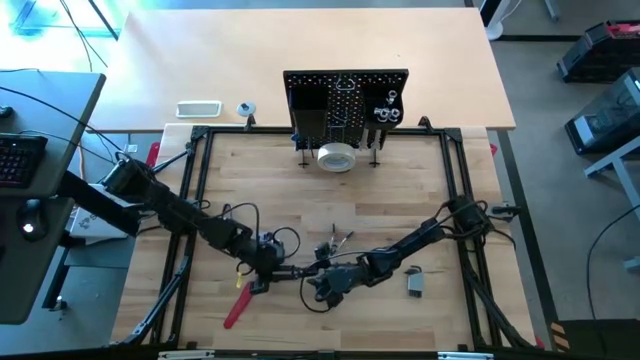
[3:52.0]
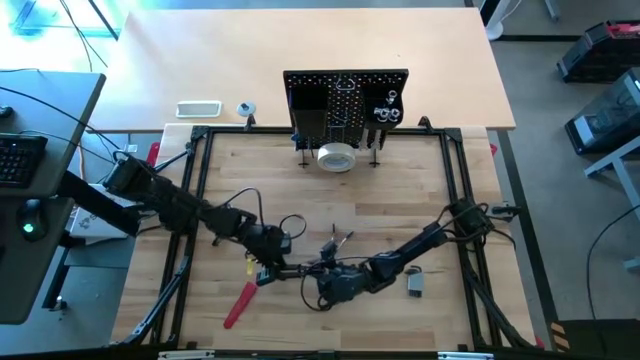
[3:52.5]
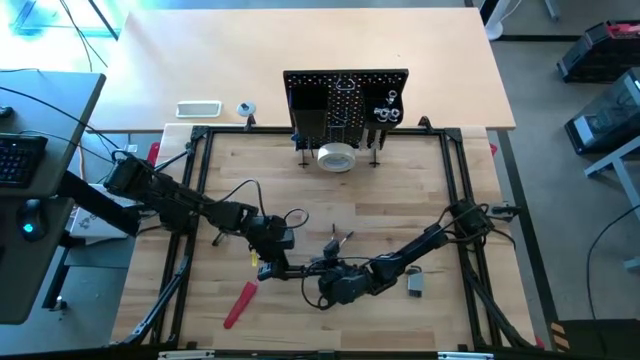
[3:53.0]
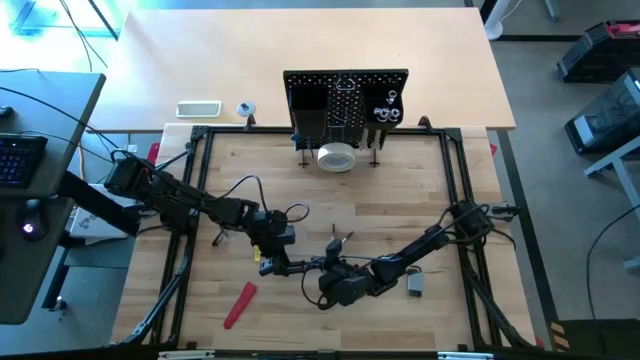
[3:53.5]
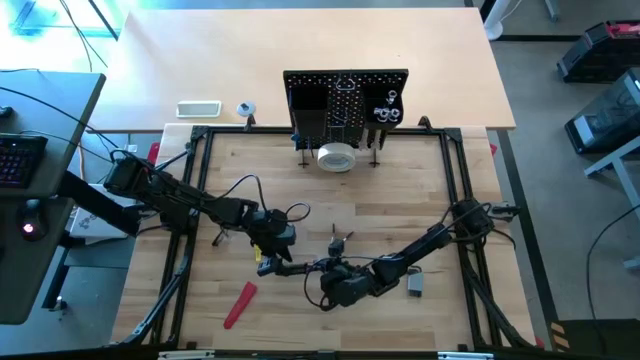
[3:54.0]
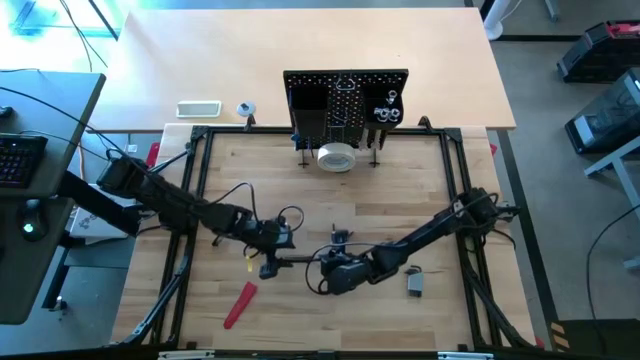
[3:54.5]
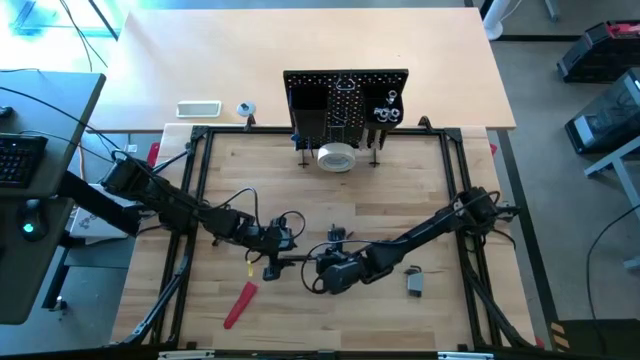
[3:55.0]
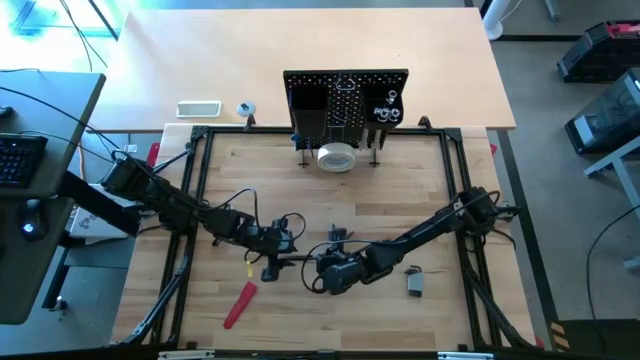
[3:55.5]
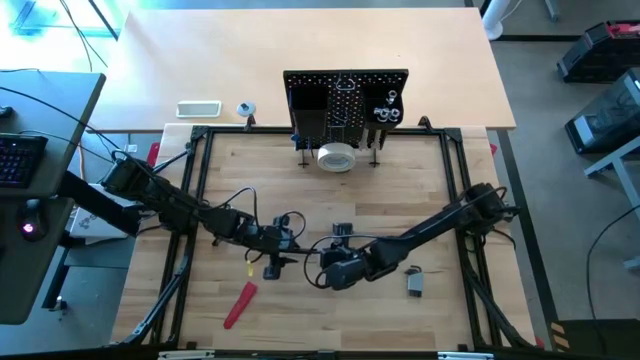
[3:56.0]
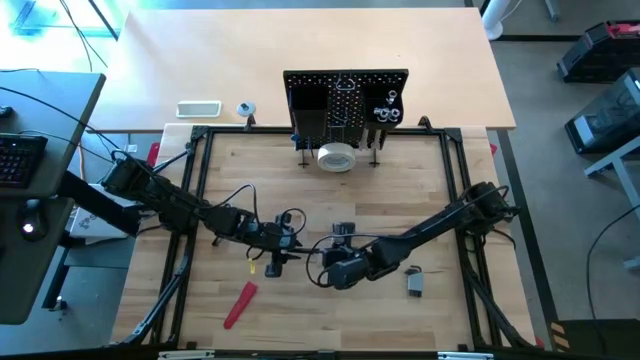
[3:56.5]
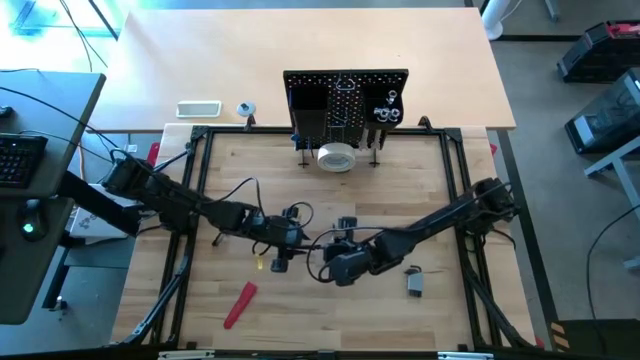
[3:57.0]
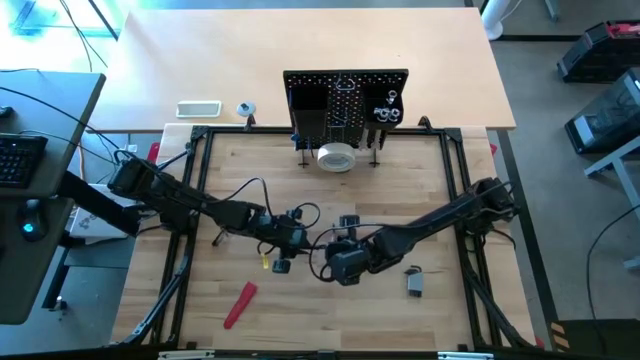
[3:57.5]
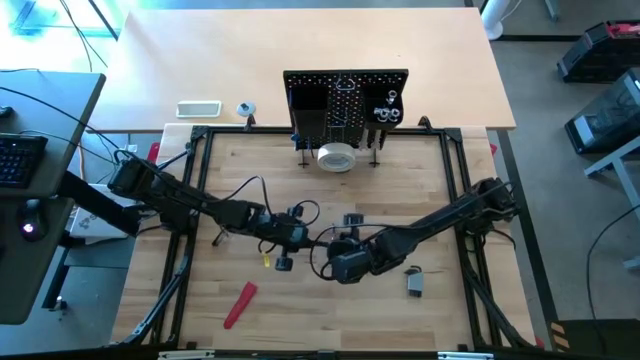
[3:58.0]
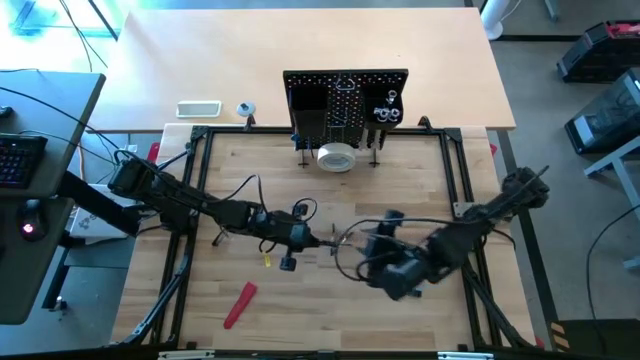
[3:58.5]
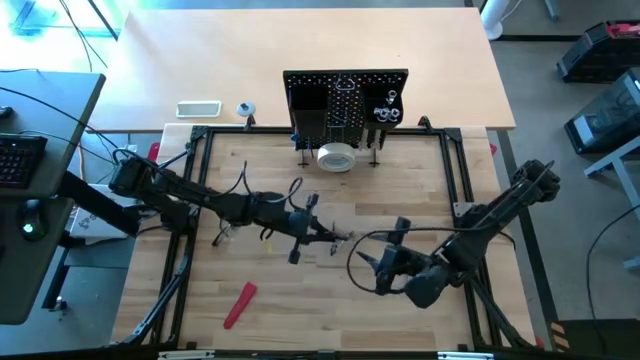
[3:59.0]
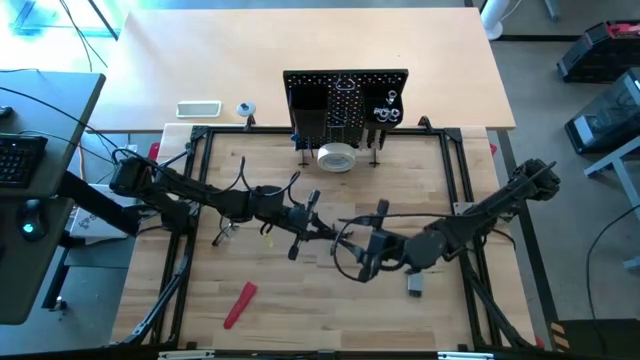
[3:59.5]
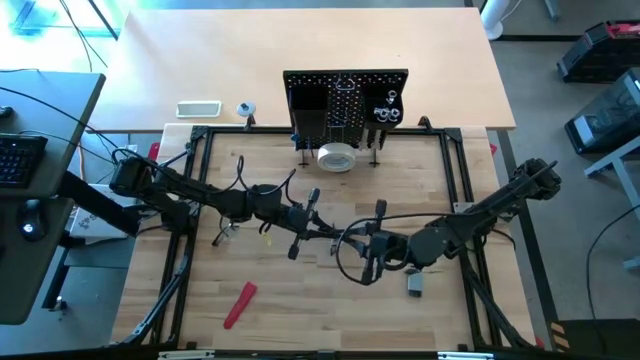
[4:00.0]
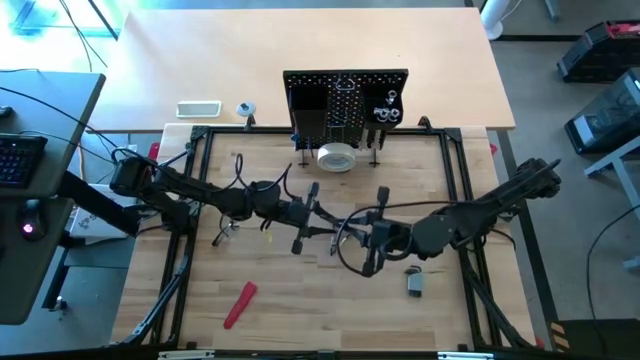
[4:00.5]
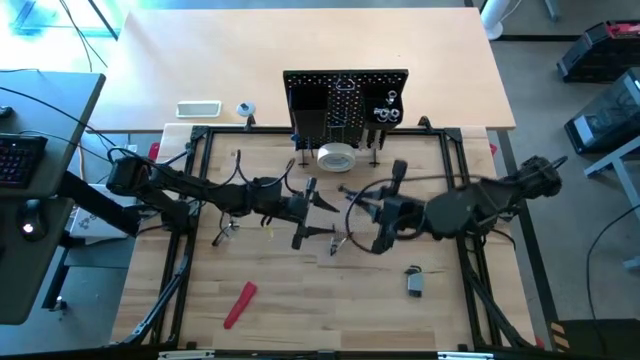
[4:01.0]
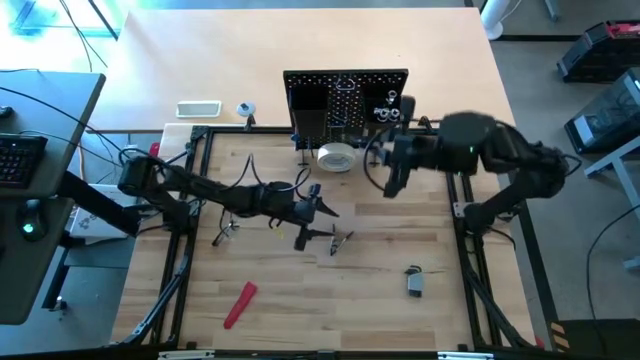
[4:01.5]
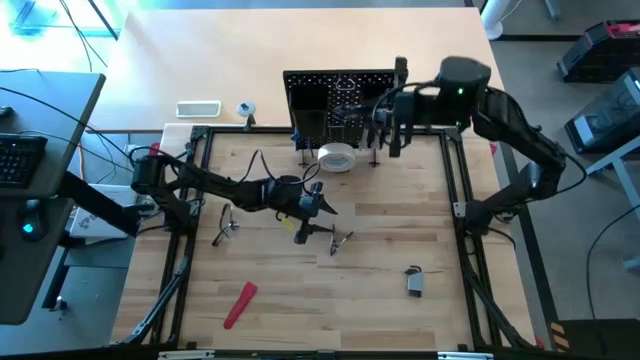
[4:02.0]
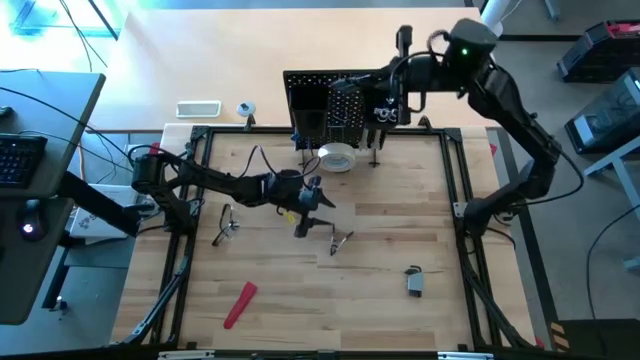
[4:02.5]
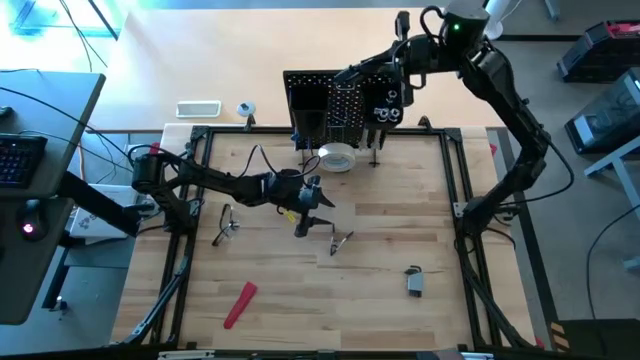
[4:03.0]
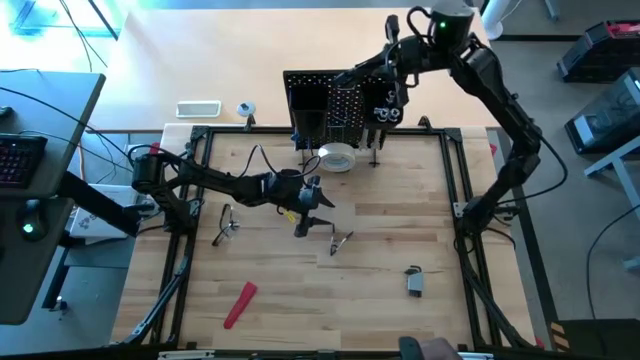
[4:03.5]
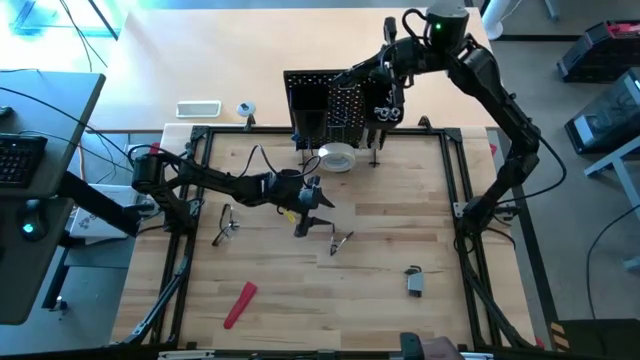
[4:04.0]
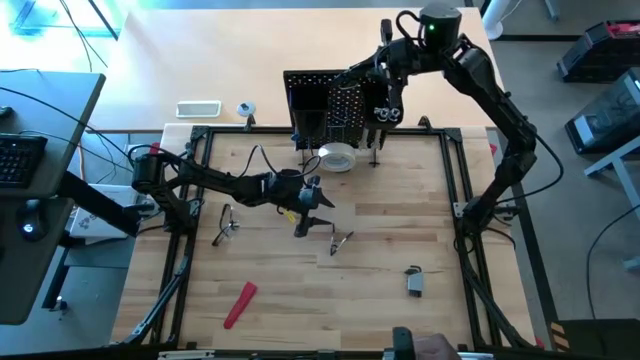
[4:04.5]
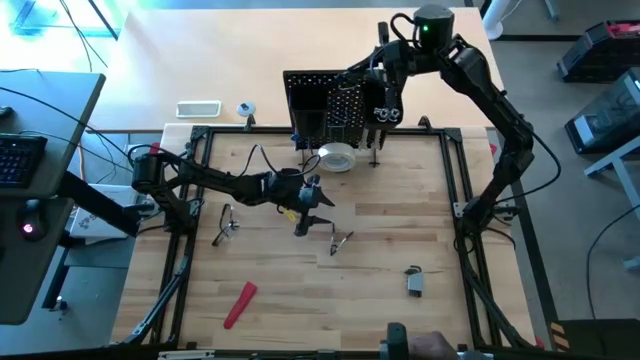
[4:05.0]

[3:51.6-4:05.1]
Task: Hang tools onto peg board
Hang the black wire stripper on the peg board

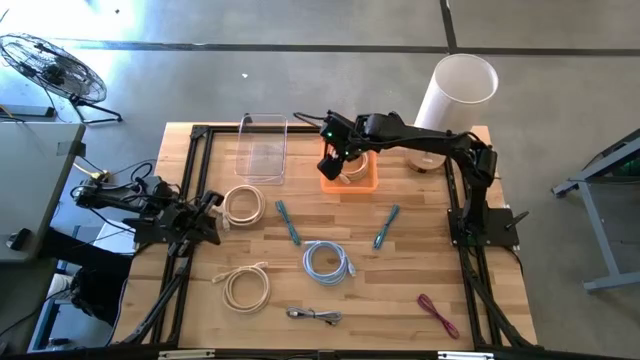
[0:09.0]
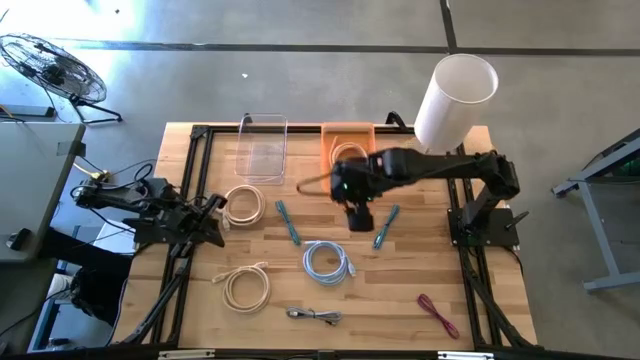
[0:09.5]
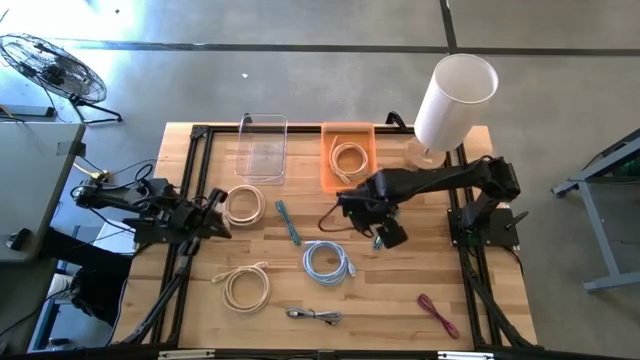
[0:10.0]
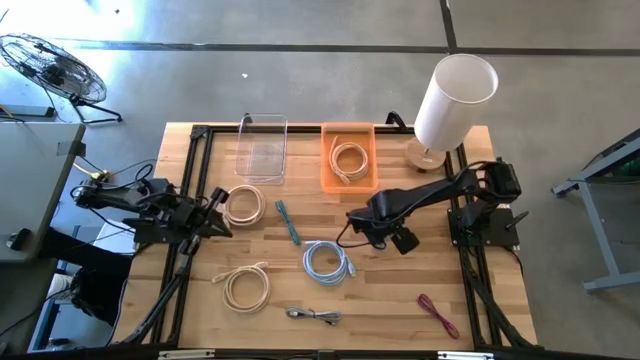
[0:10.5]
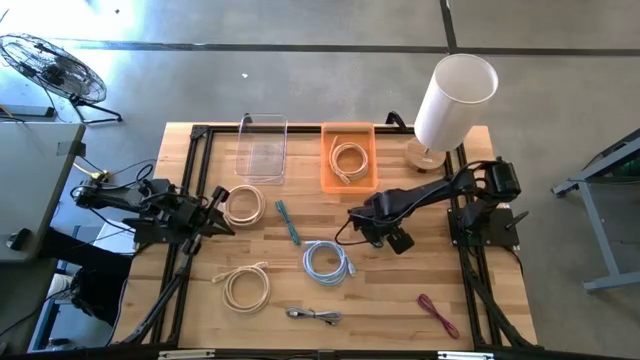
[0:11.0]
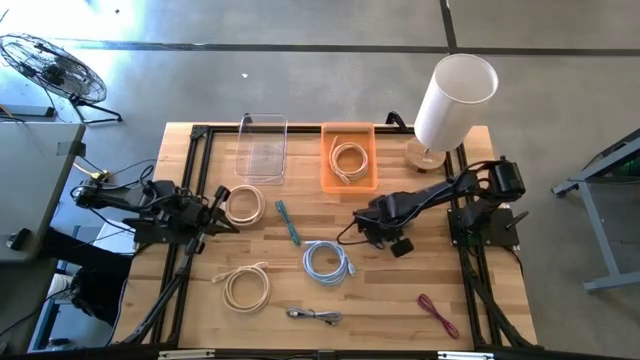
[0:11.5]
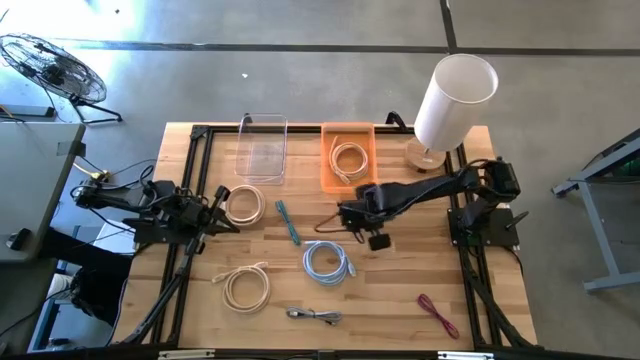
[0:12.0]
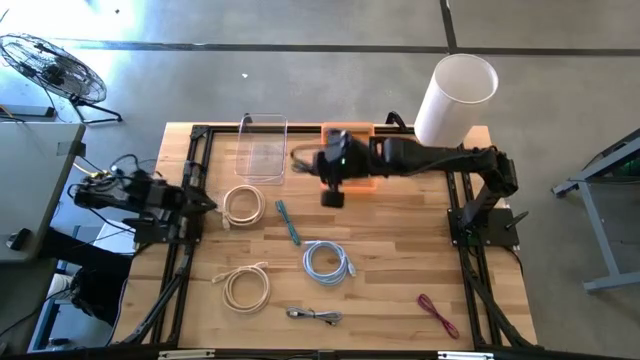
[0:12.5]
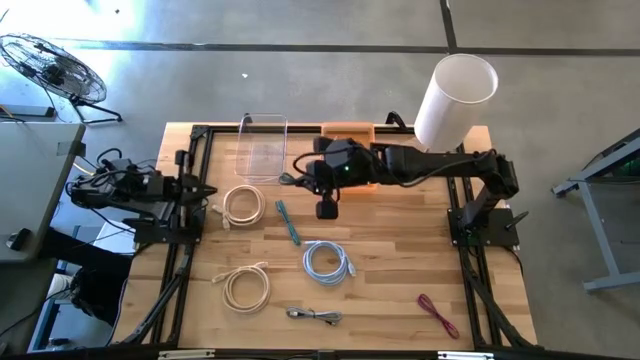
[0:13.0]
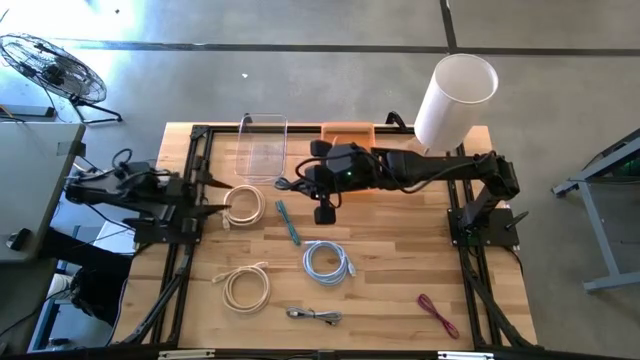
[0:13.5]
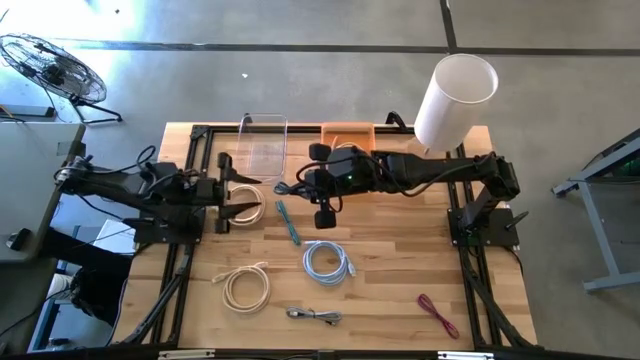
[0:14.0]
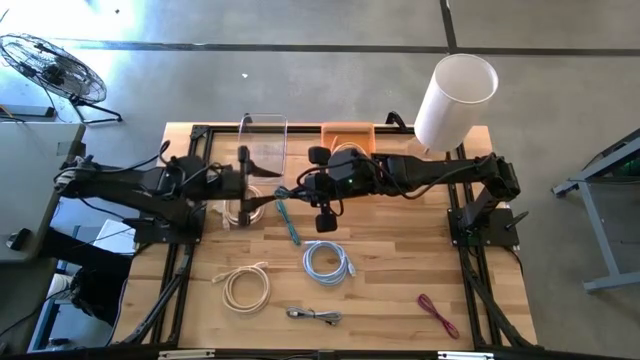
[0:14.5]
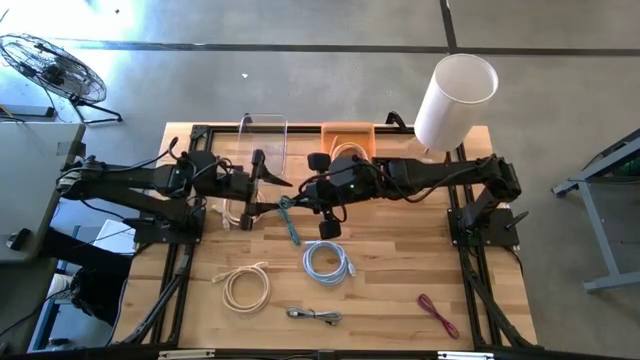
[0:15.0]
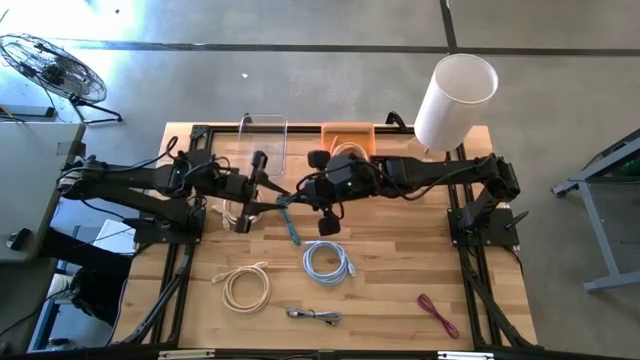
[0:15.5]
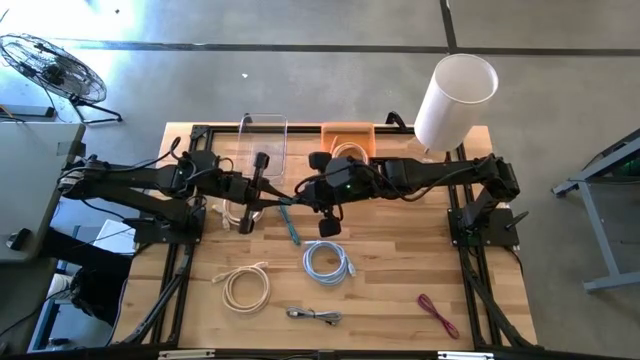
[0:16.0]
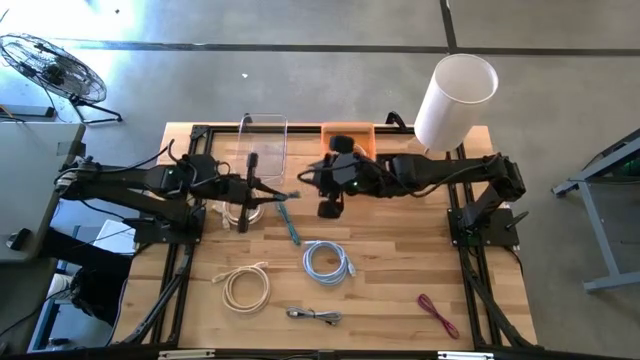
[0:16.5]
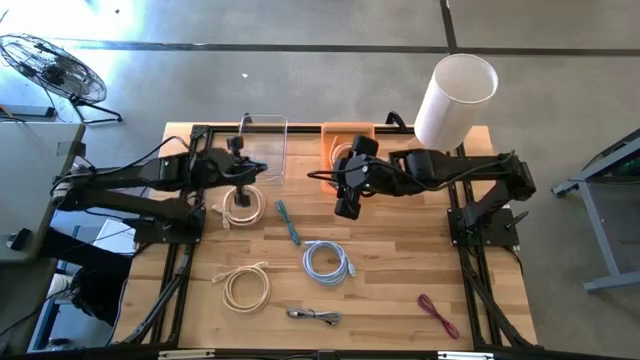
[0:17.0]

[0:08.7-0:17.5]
Task: Pick & Place USB Port
Put the right black and blue charger cable in the transparent bin
